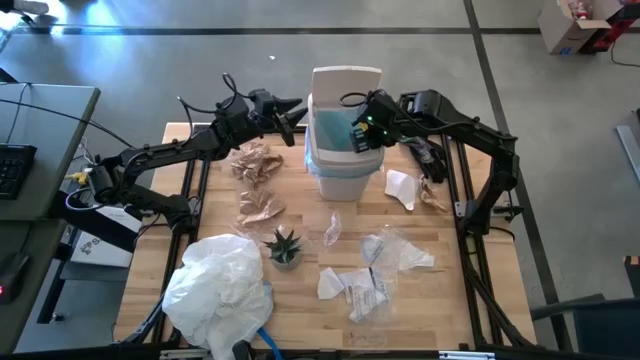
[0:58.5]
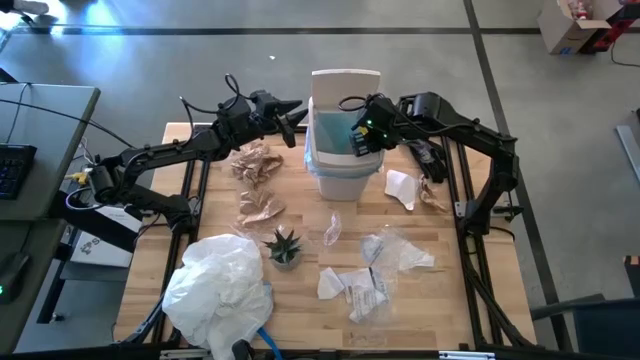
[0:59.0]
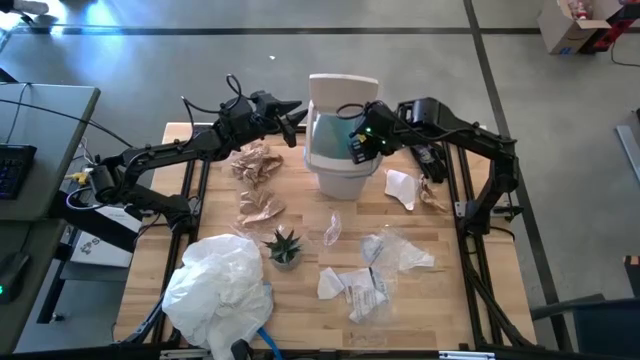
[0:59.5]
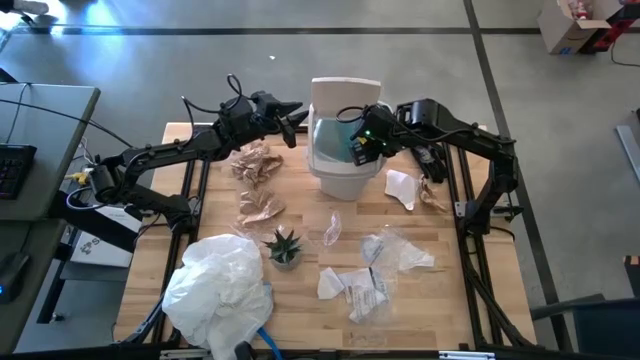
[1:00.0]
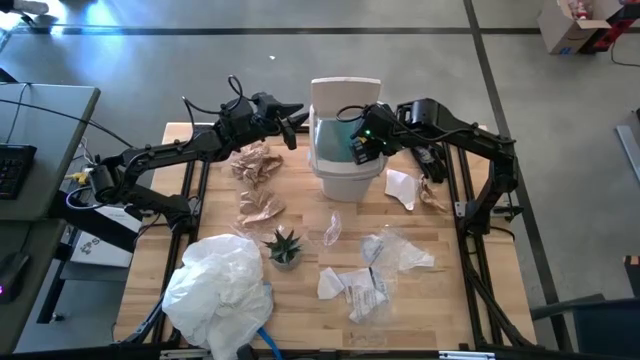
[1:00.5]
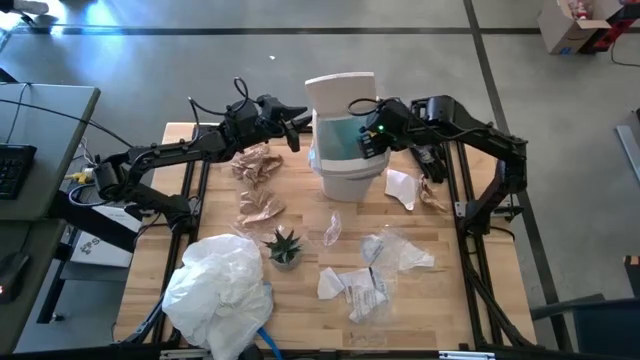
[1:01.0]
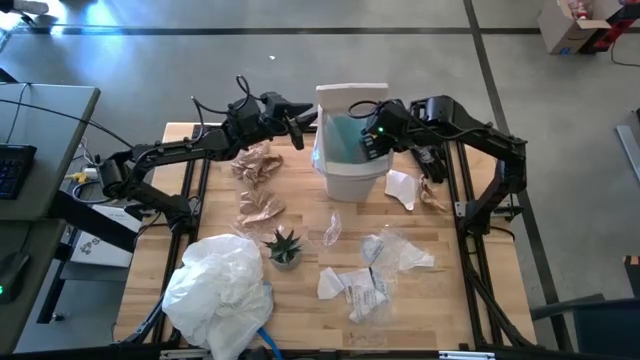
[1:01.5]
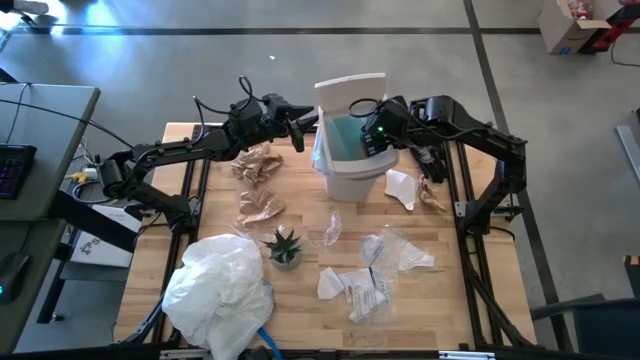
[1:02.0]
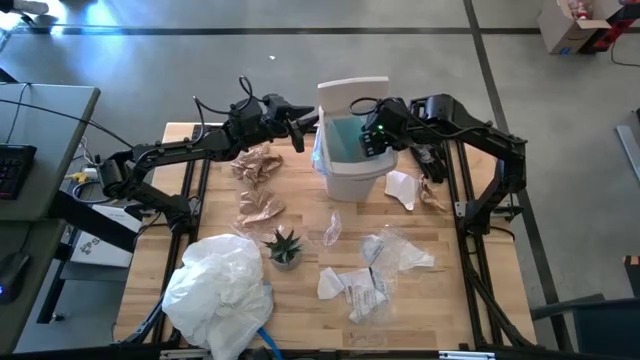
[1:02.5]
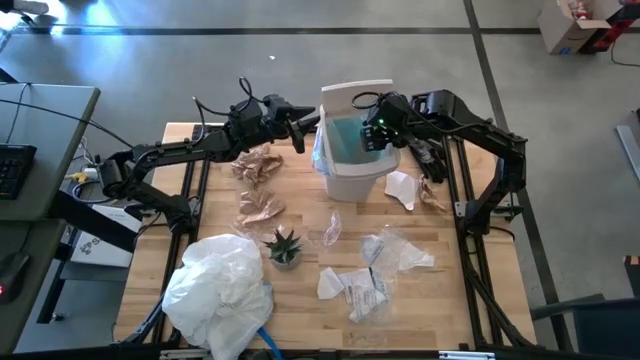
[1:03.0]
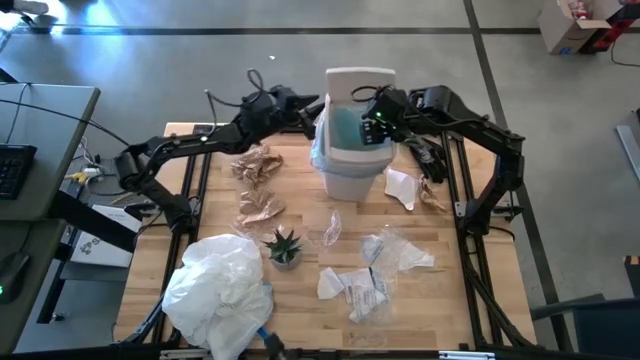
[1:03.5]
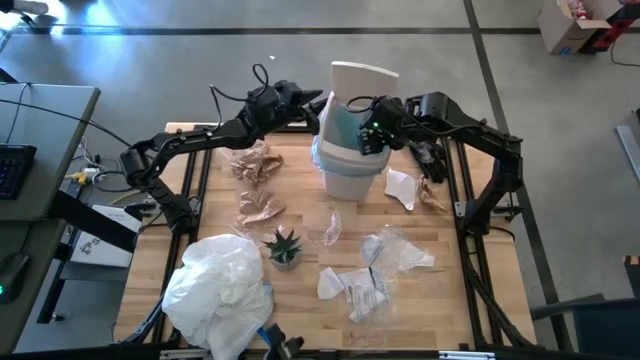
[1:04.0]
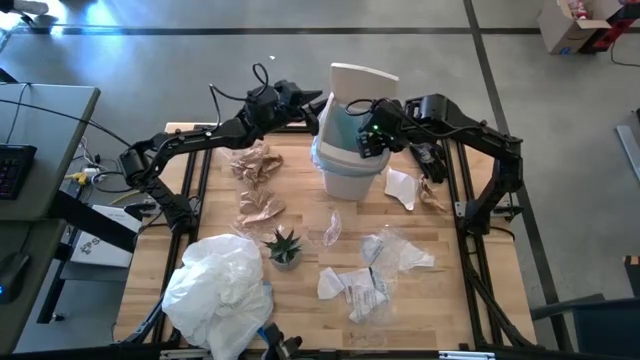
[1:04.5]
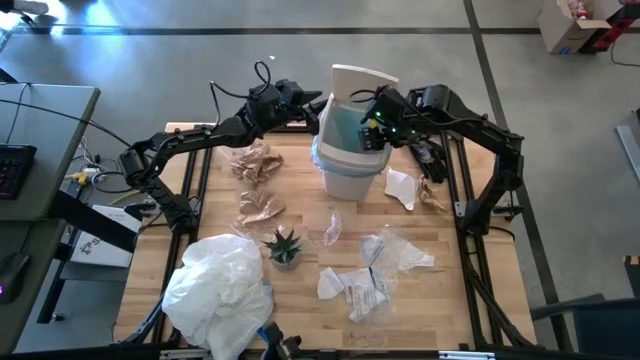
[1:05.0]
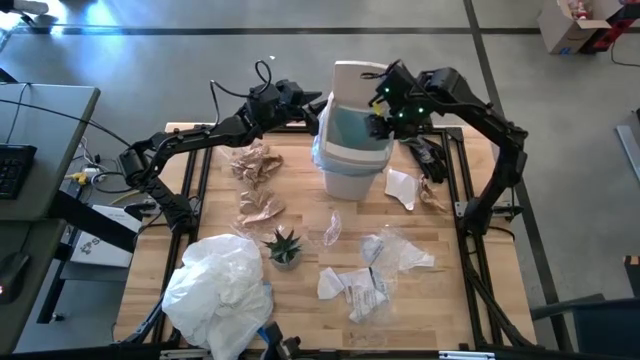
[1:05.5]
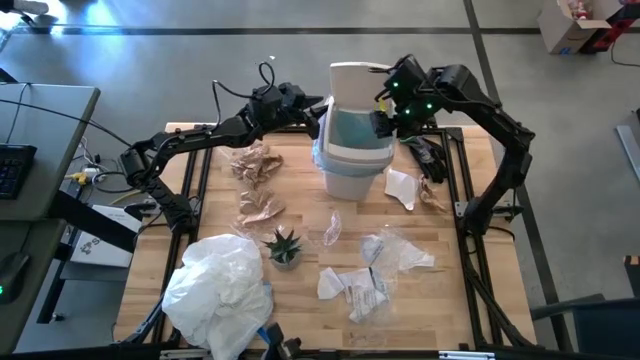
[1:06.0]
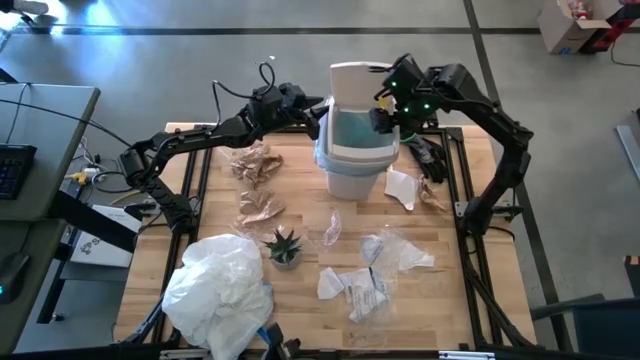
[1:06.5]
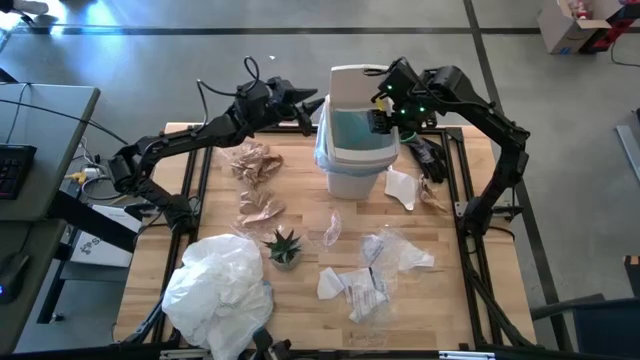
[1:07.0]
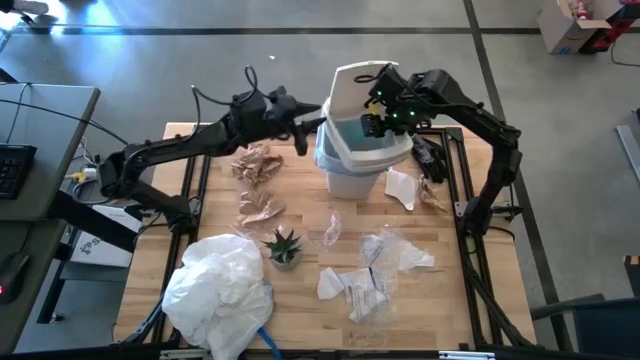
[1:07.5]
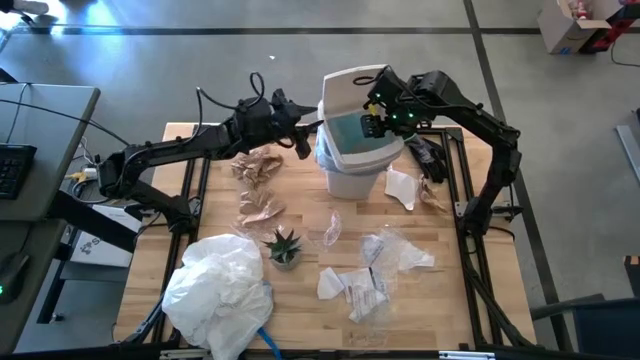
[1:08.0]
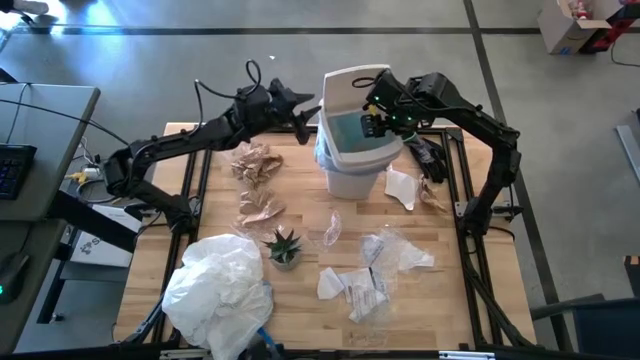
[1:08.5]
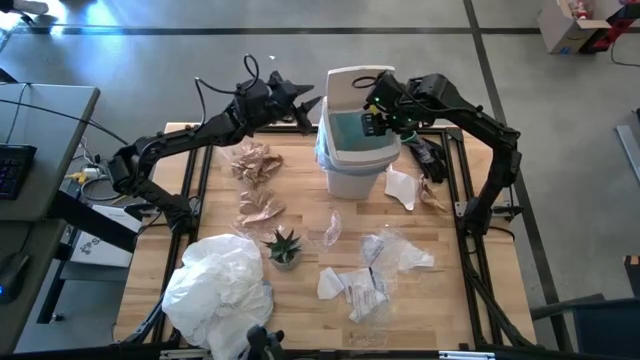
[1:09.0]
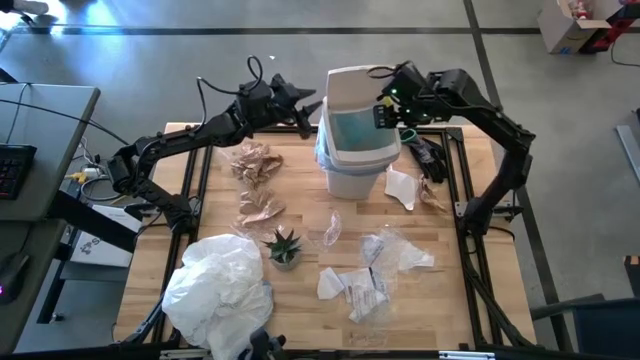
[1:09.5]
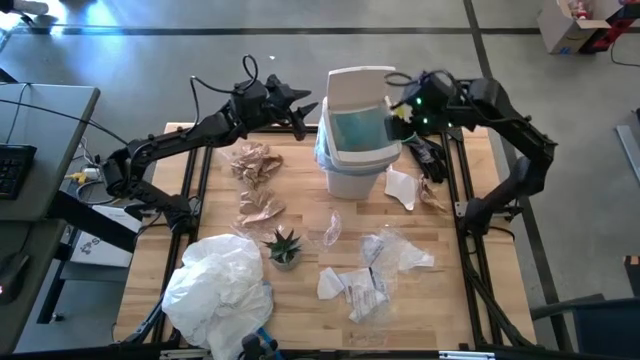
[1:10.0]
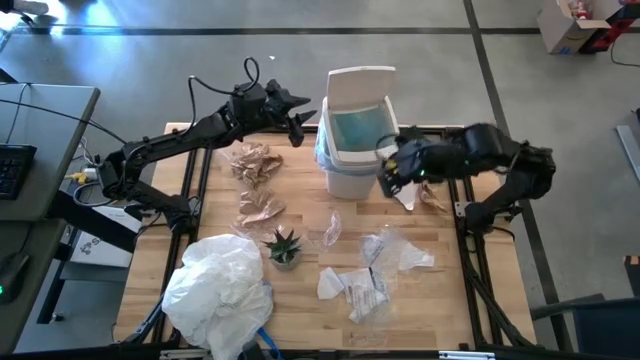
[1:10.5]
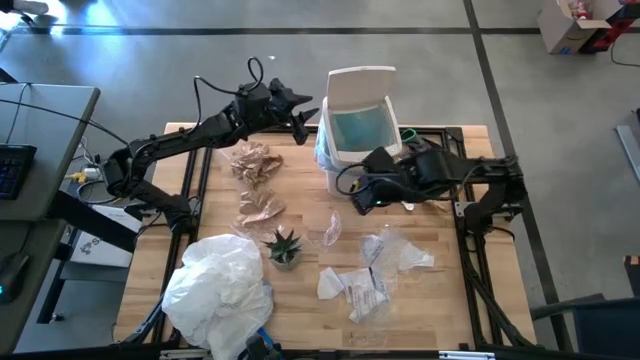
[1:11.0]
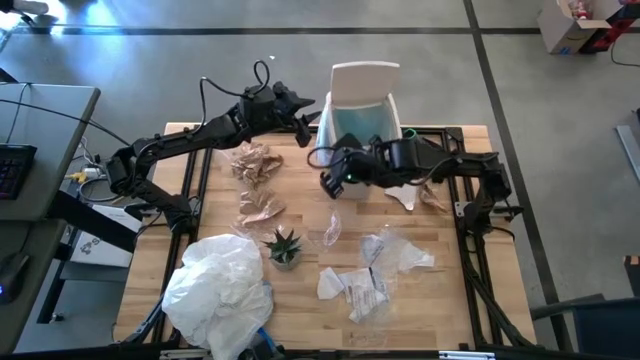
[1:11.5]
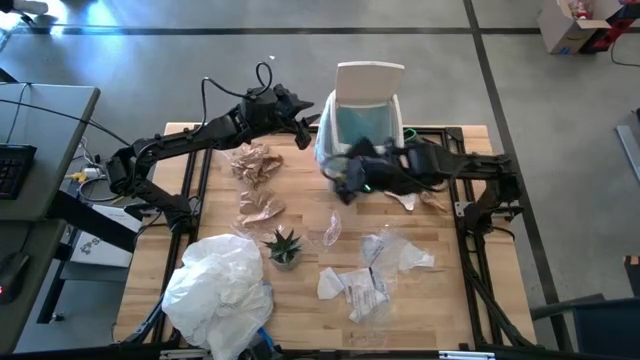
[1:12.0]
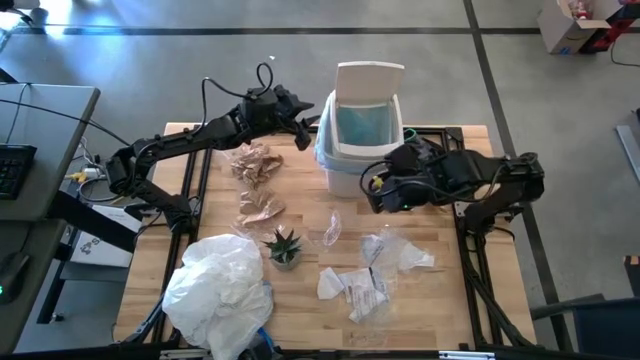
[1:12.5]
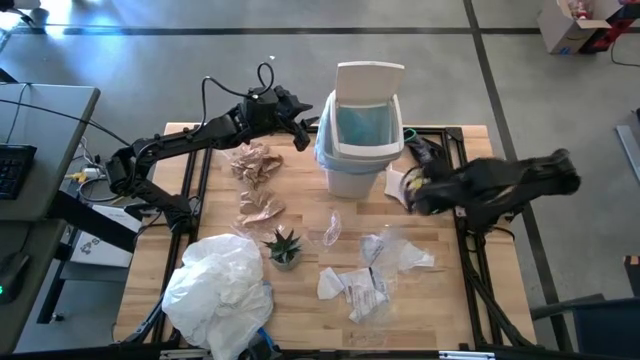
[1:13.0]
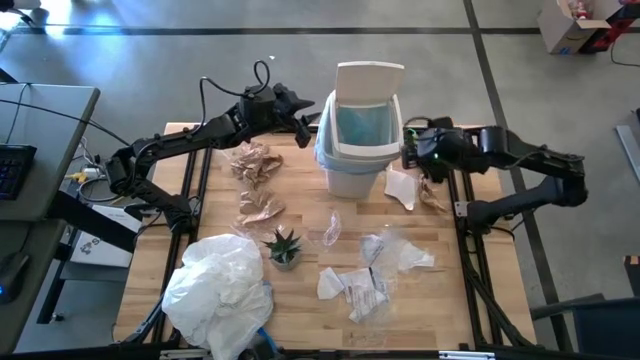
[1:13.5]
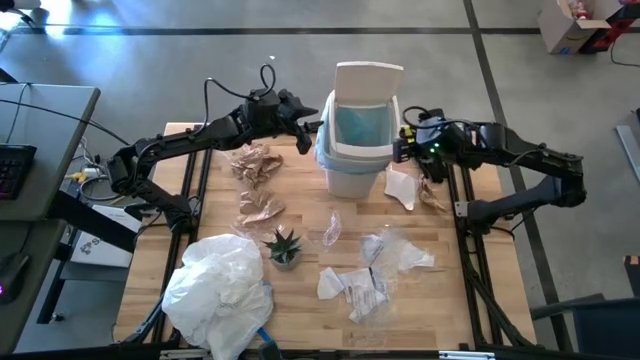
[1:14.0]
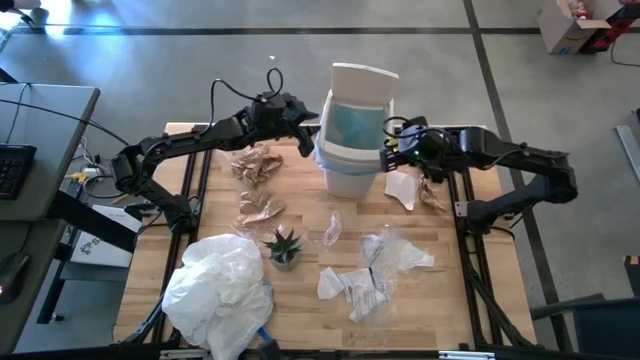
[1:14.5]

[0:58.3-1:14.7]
Task: place trash/remove bag and relplace
Adjust the trash bin

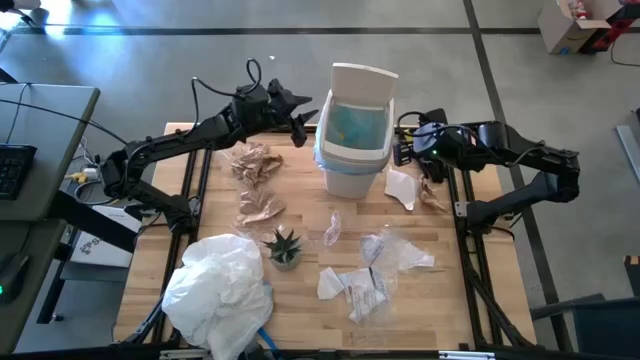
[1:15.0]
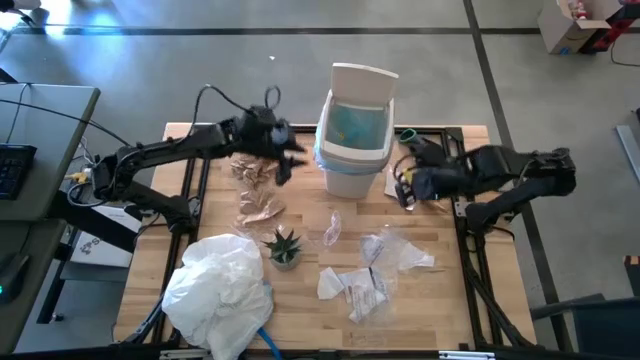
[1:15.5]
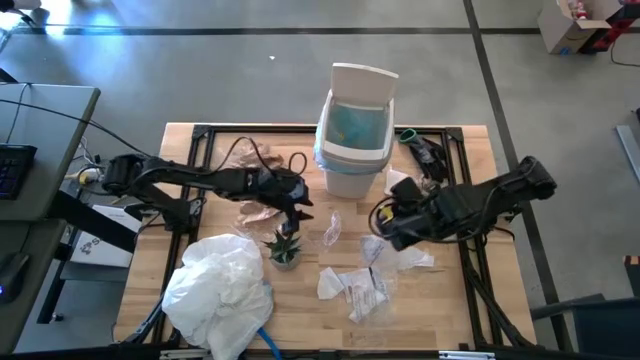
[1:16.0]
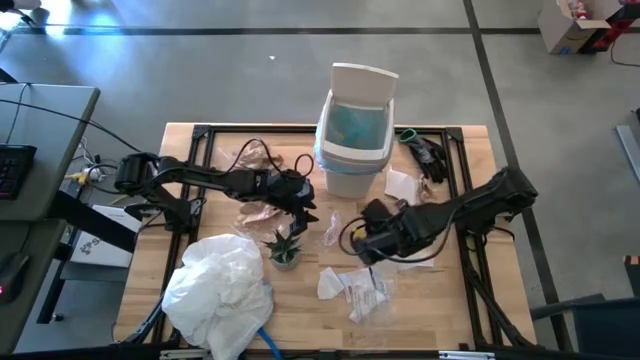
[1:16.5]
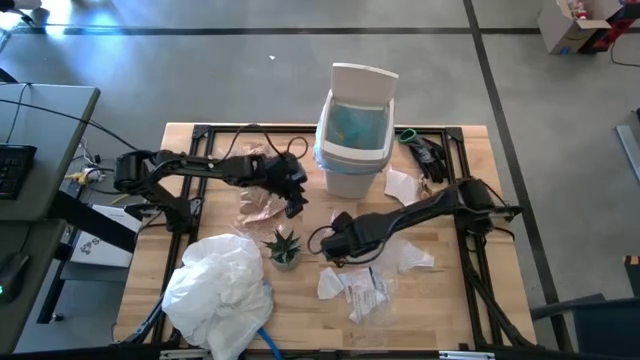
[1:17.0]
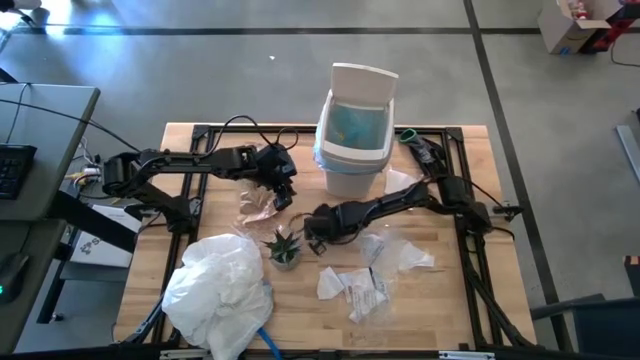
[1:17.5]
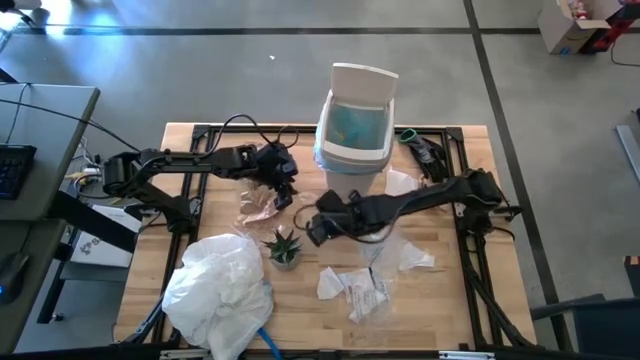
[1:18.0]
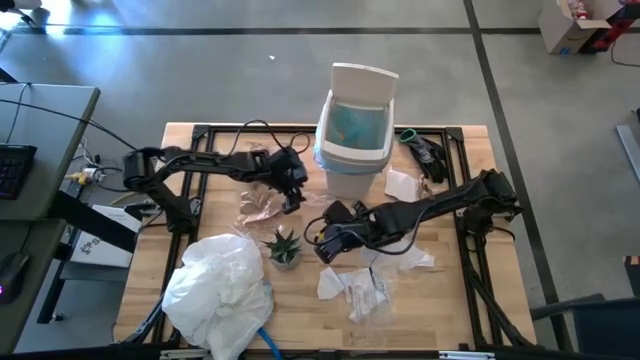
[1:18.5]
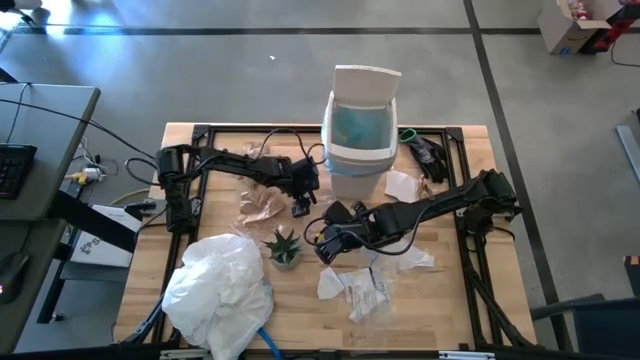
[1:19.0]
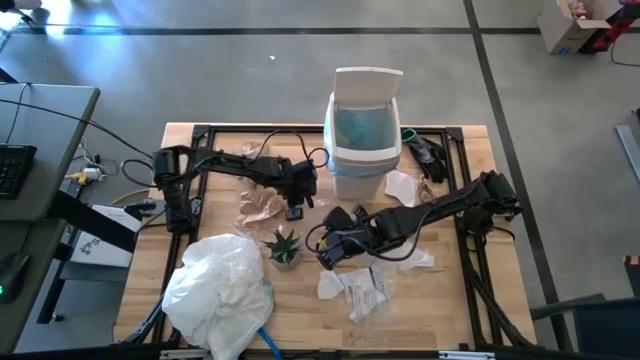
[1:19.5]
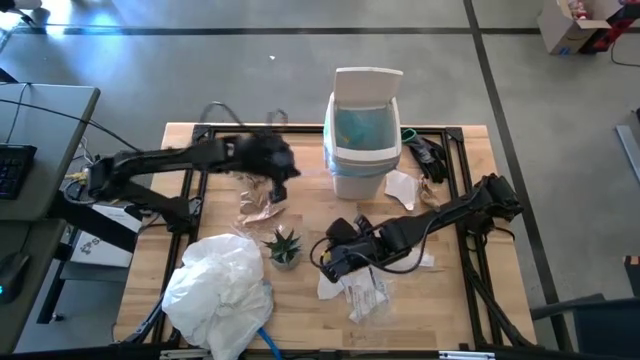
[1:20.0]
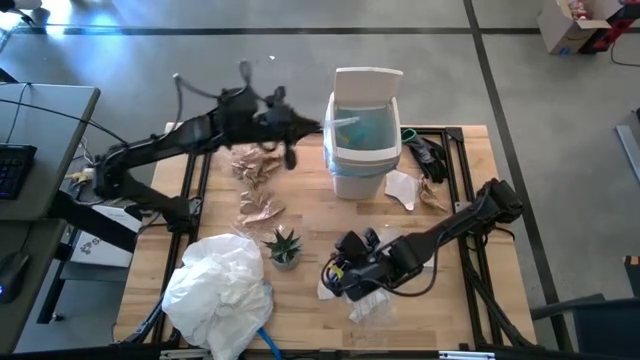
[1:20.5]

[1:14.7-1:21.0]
Put the transparent plastic into the trash bin
